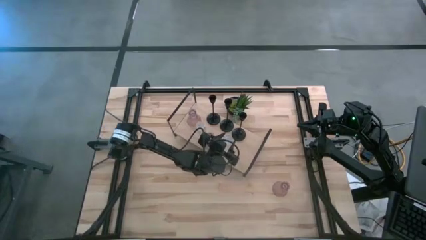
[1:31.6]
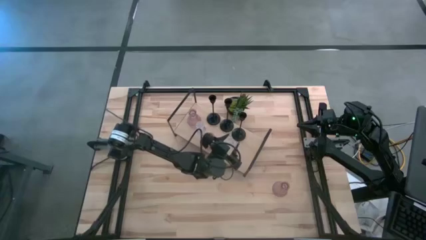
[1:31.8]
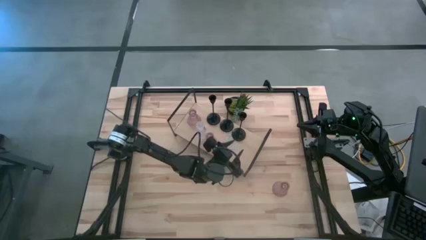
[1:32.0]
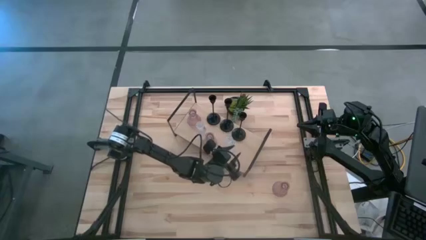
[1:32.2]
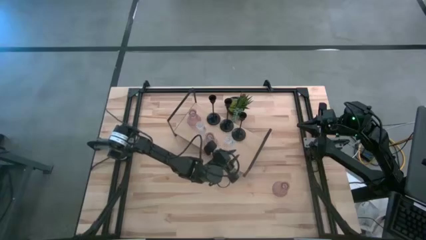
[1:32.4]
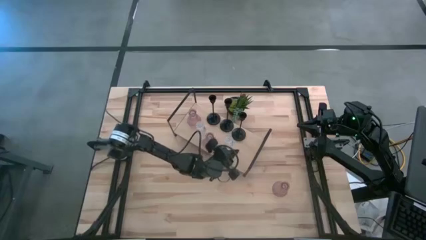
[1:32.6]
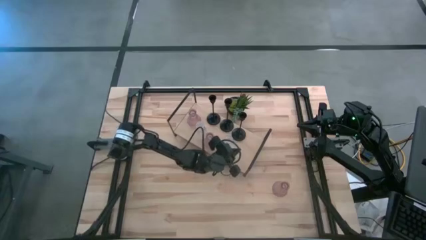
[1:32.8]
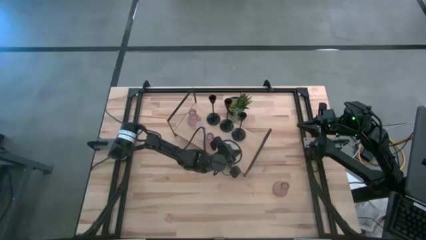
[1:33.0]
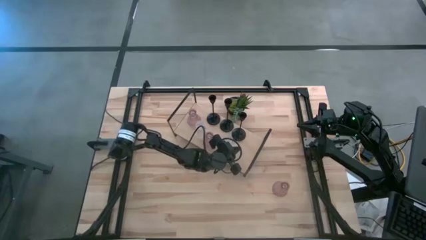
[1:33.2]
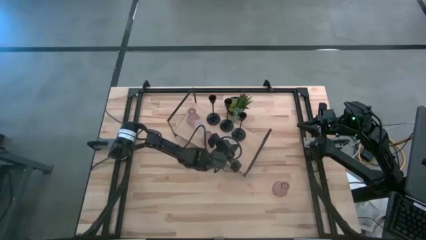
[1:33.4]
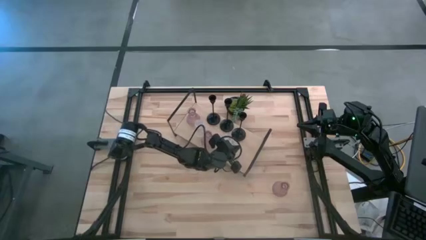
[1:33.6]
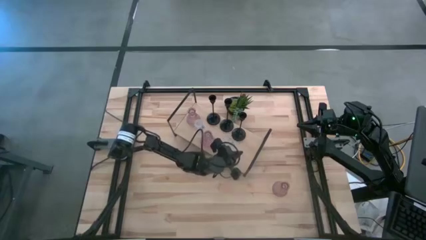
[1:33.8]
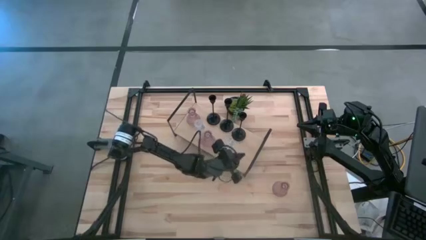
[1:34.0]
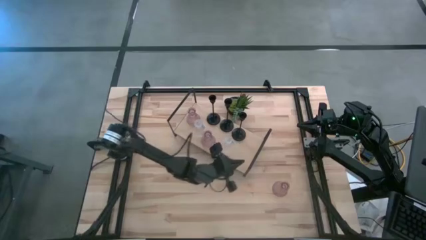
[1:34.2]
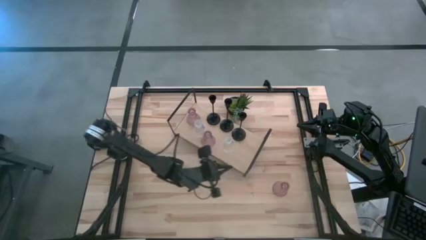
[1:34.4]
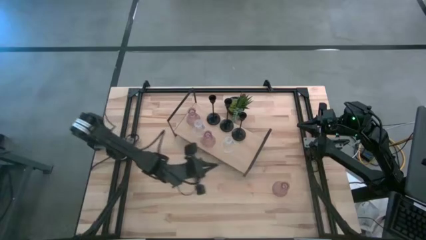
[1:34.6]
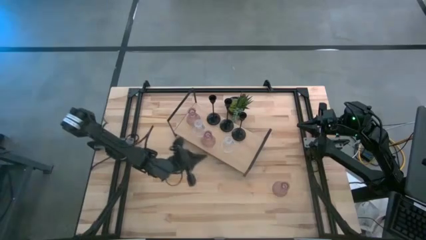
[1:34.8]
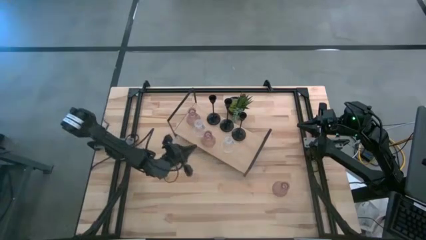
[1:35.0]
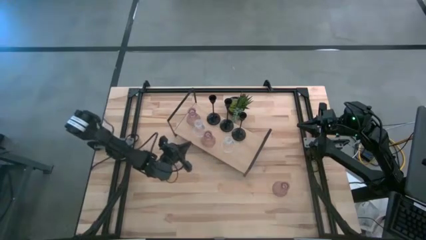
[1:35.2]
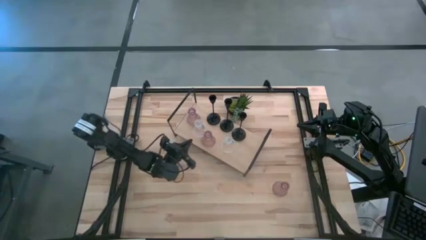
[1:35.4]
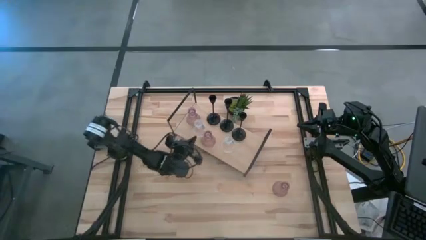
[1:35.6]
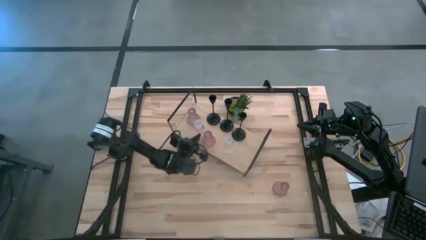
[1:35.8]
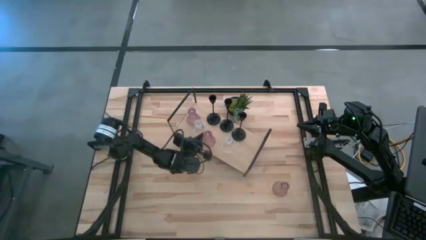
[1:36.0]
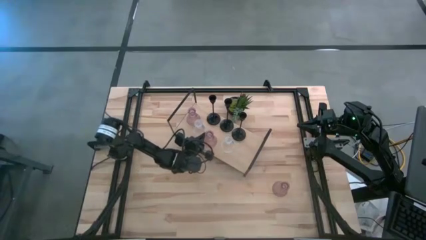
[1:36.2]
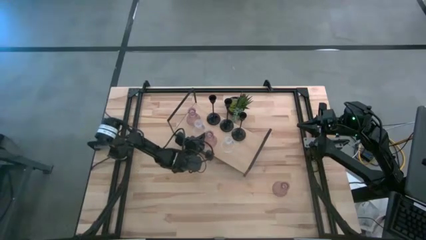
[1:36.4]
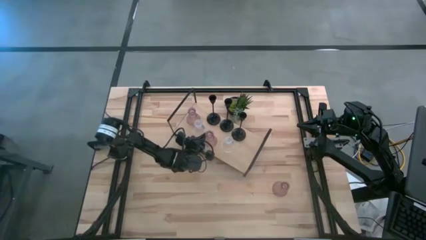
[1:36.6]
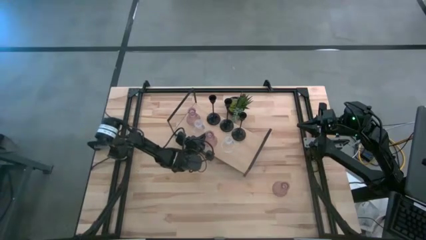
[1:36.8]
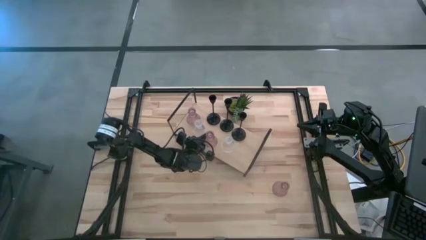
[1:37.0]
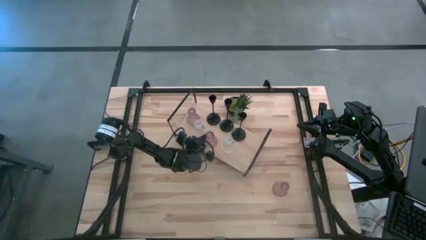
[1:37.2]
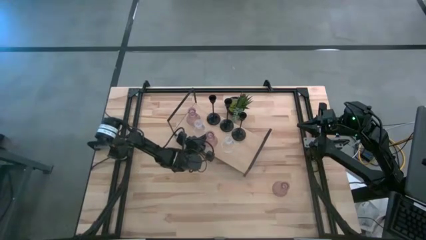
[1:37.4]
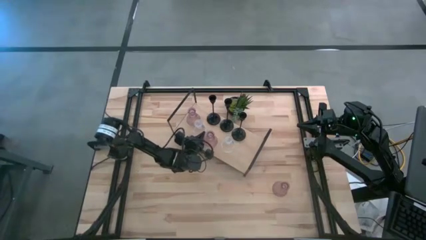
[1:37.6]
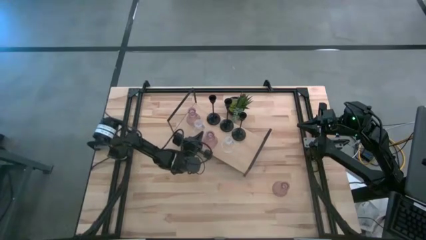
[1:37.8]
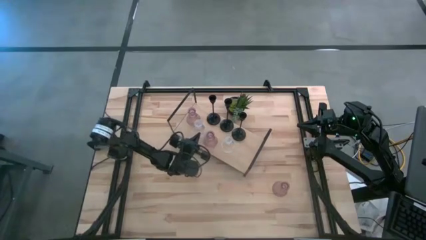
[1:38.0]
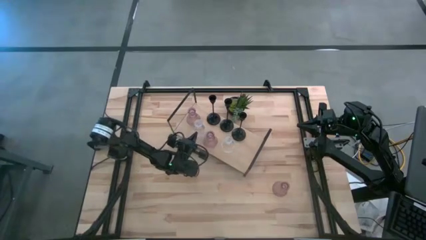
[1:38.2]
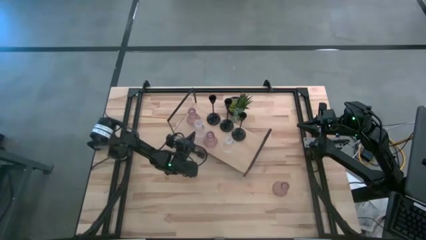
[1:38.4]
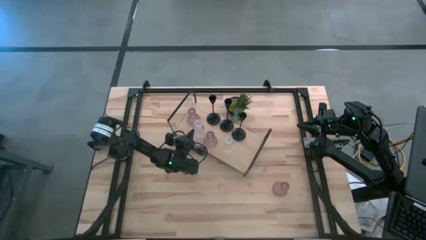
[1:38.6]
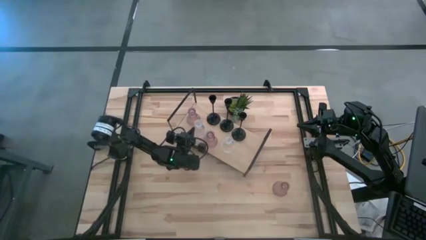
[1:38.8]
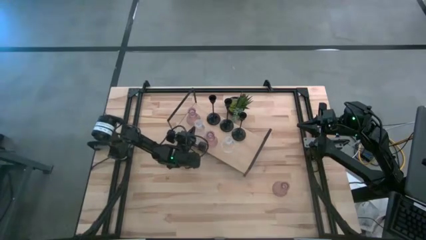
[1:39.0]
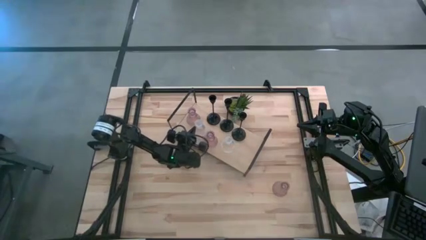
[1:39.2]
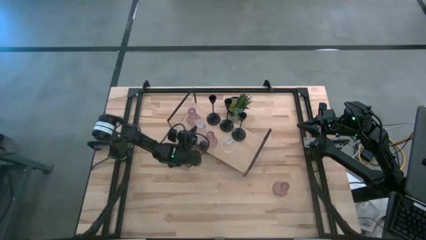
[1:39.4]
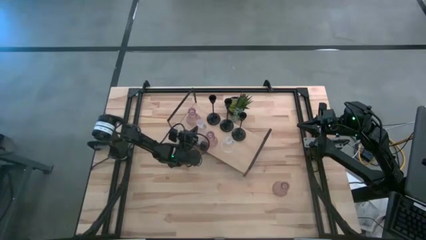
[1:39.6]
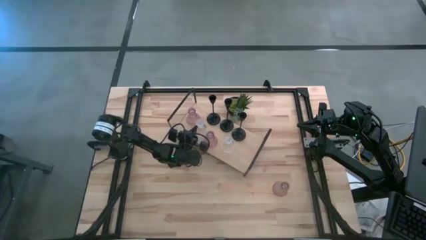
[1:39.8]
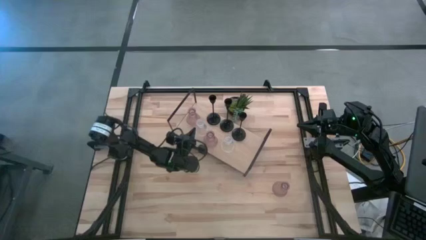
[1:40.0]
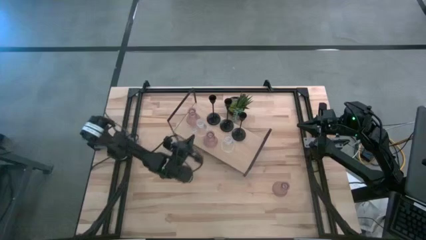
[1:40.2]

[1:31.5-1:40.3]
Task: Pick & Place candle stick holders
Adjust the glass candle holders on the shelf

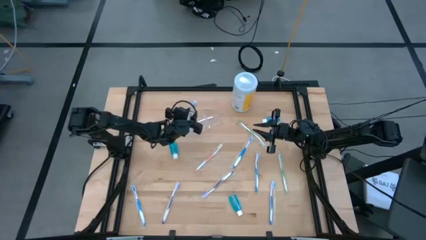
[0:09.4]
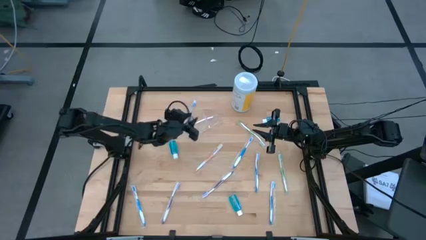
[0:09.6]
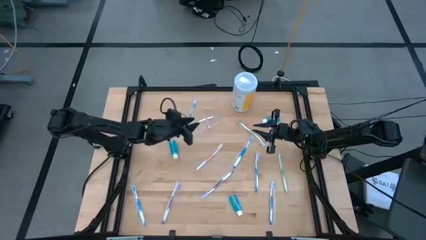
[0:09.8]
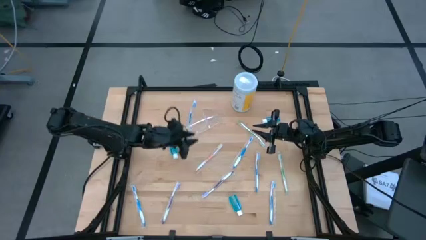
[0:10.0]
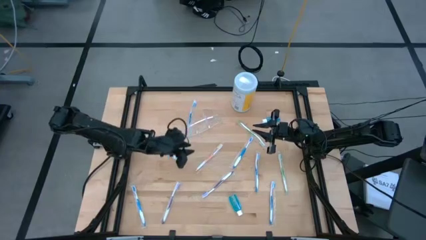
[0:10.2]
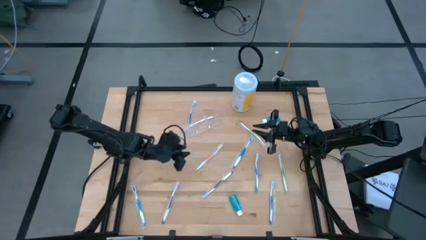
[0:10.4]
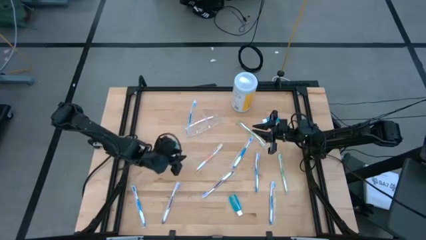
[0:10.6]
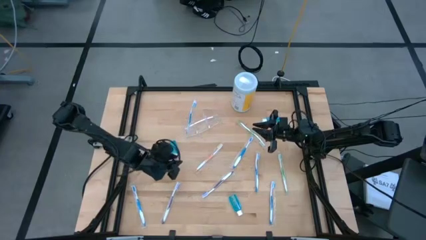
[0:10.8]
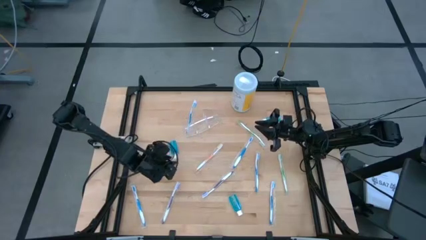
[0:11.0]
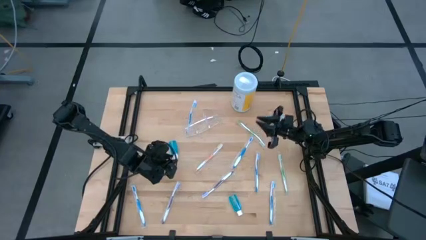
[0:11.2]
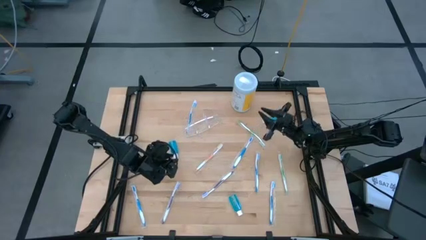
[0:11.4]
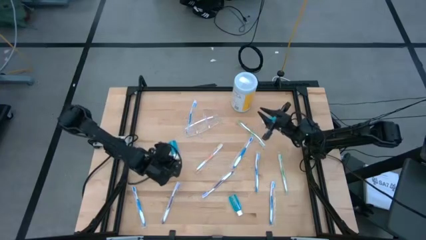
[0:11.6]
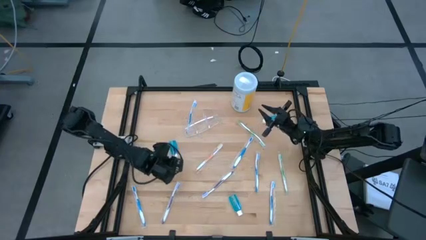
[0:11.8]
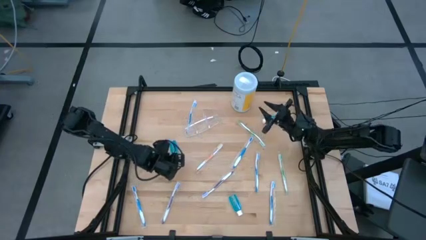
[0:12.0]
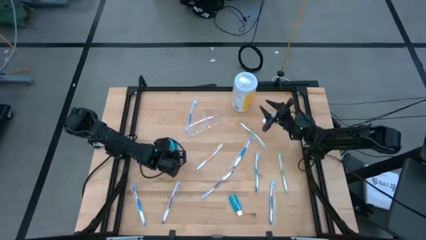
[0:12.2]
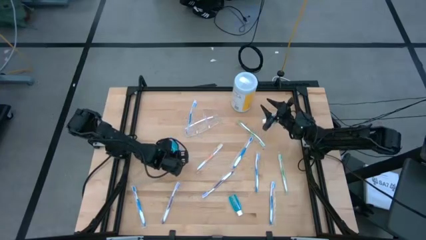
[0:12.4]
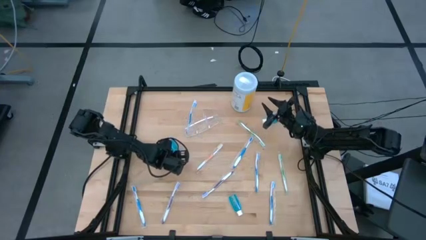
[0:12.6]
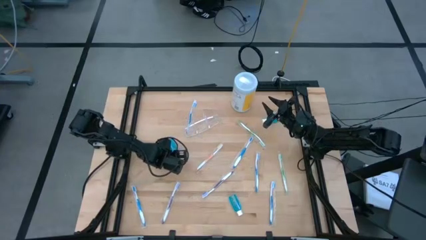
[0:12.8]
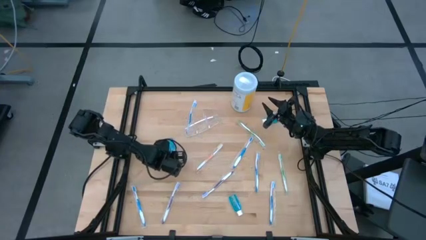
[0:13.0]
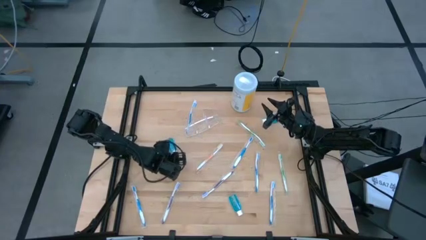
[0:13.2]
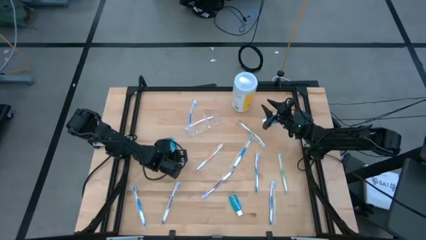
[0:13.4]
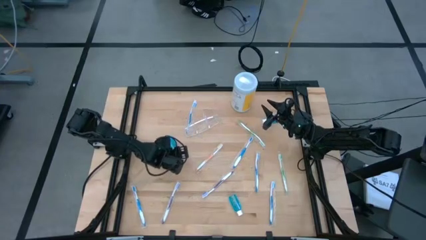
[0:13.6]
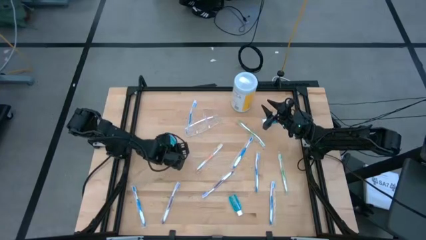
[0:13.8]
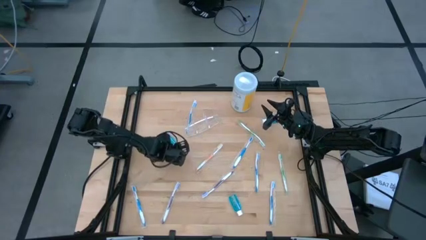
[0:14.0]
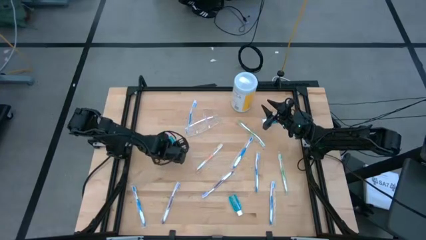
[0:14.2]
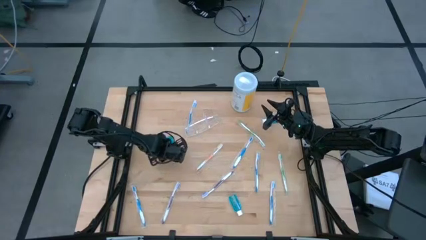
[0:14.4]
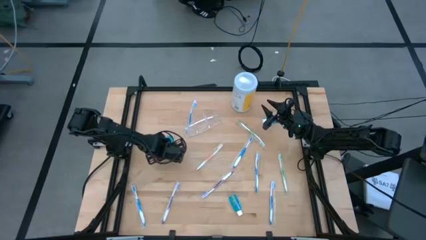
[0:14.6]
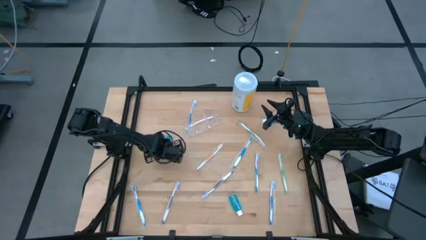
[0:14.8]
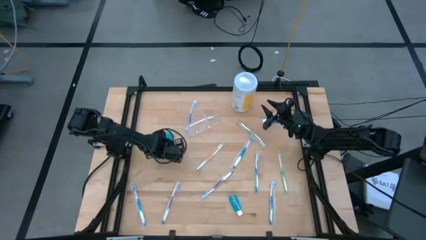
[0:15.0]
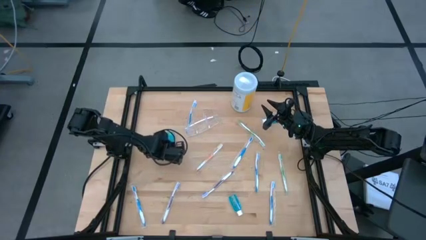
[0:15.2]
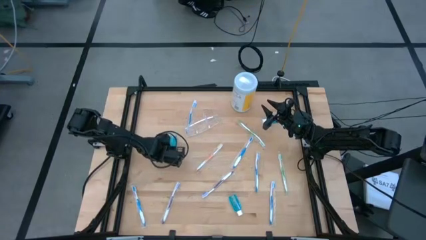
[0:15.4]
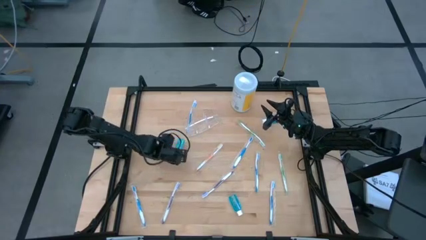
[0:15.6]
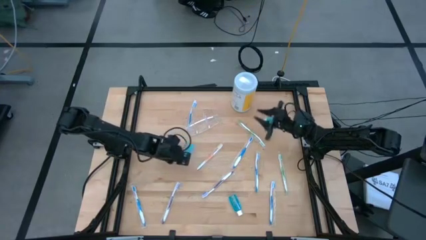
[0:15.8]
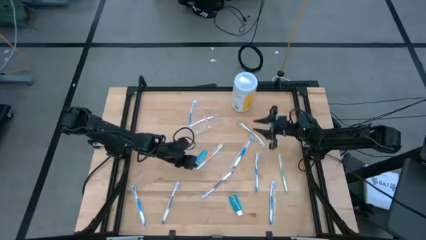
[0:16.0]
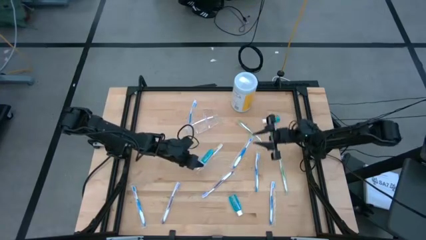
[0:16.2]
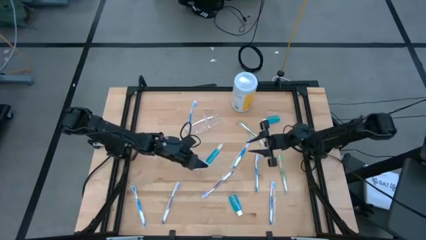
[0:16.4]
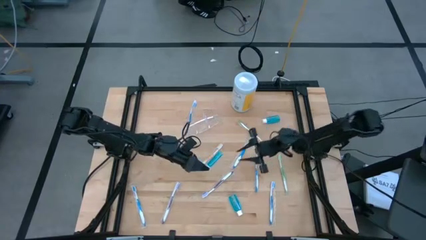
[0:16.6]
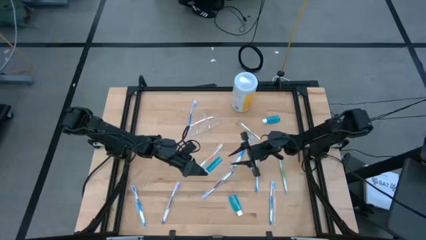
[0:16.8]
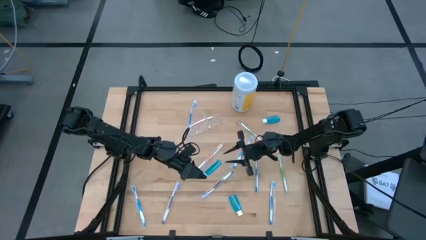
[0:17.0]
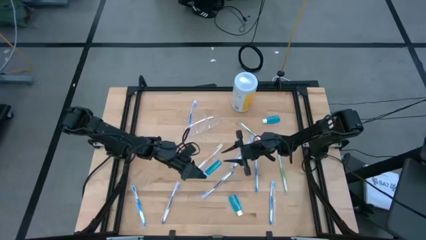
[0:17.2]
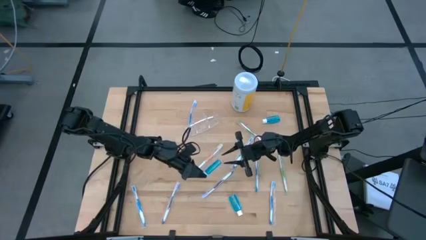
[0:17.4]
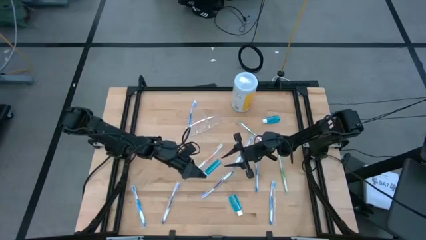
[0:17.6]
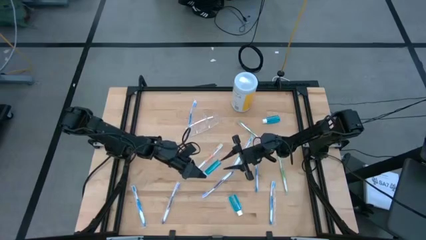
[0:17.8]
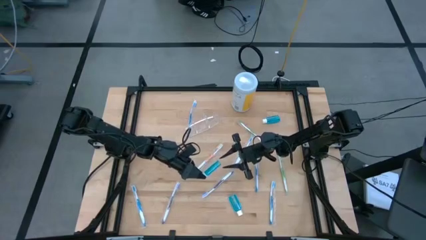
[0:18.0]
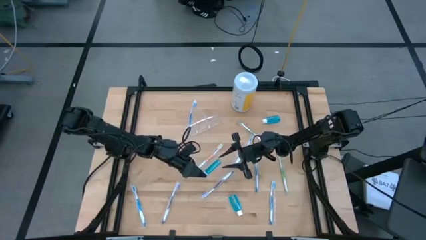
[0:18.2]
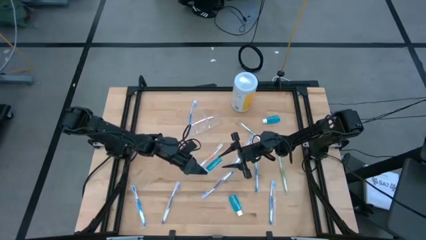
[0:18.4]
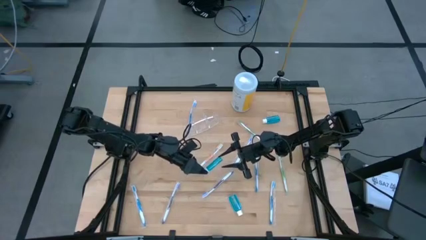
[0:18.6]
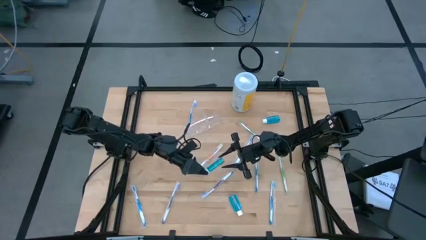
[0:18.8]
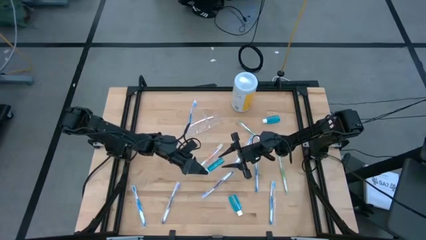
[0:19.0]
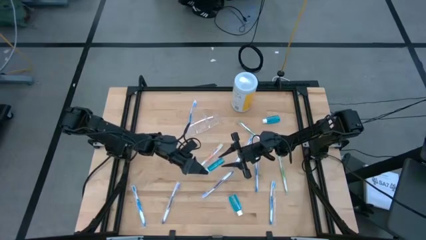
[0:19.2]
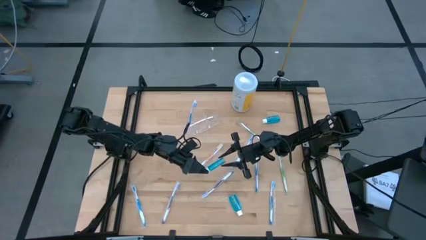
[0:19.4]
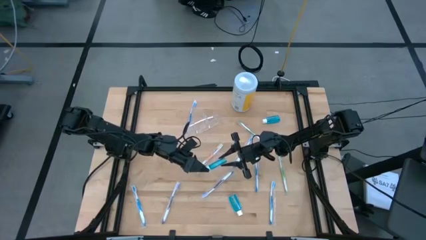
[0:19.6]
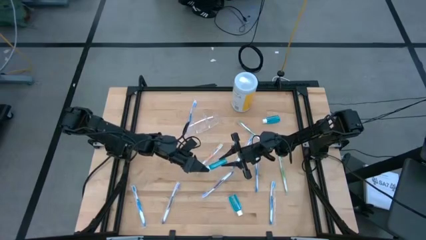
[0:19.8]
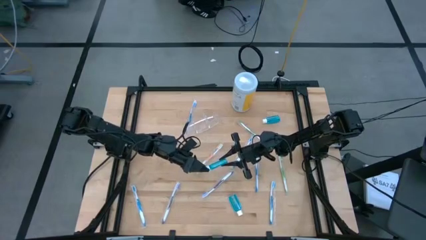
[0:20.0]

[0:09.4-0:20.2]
Task: Pick & Place toothbrushing station
Put the blue mouthwash into the transparent organizer
